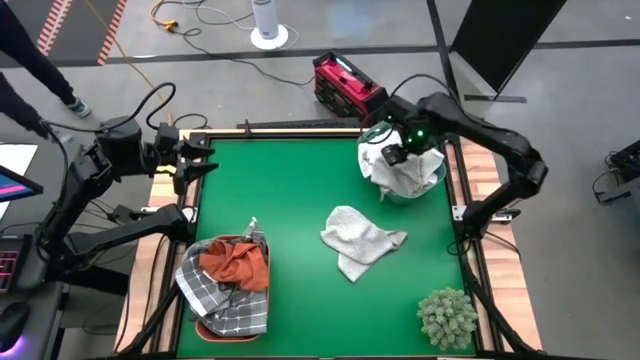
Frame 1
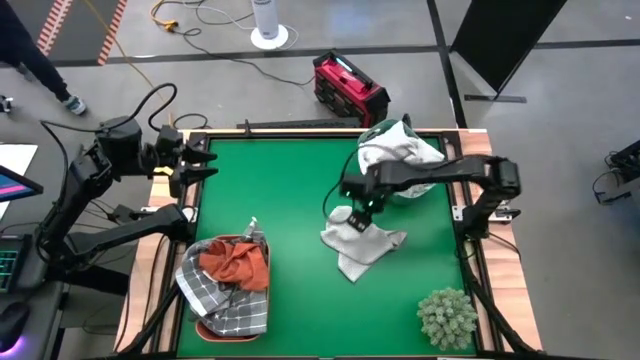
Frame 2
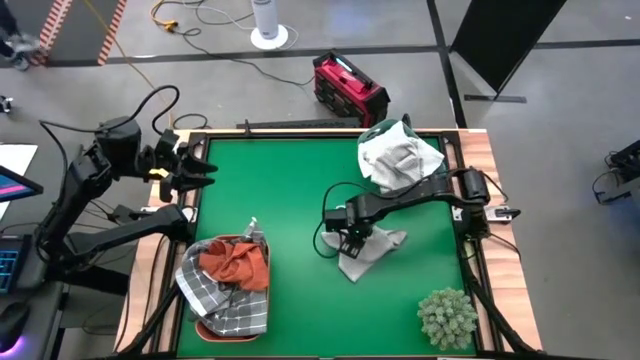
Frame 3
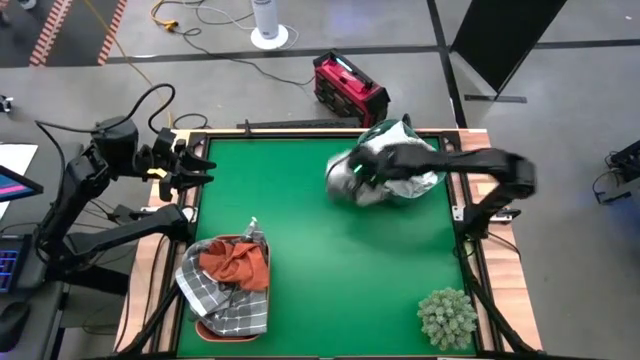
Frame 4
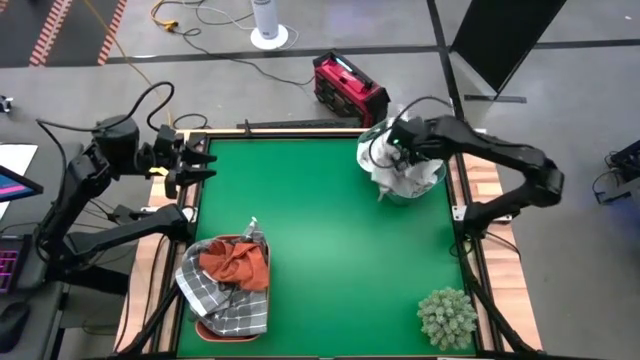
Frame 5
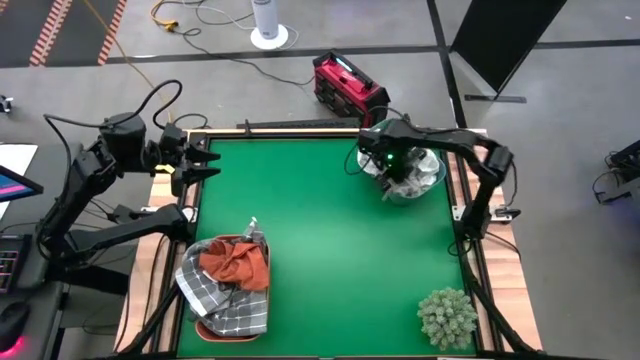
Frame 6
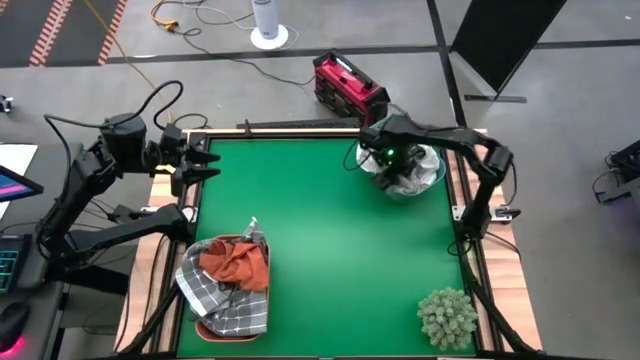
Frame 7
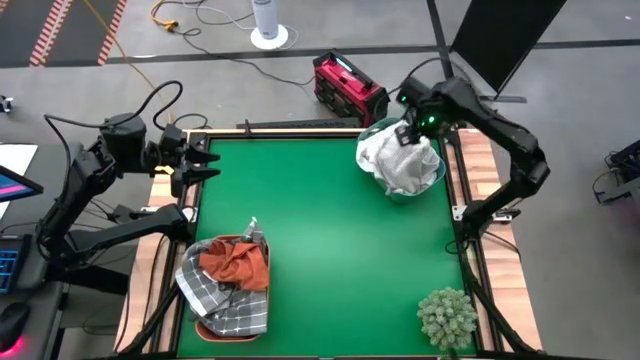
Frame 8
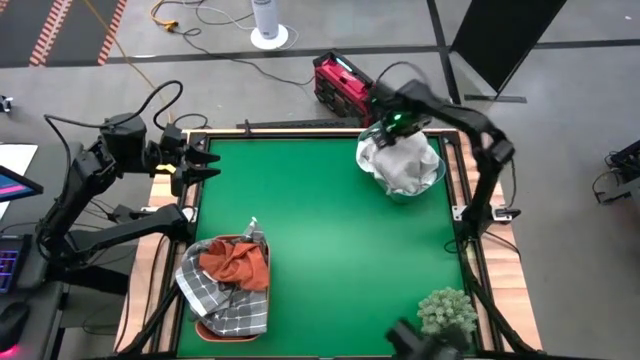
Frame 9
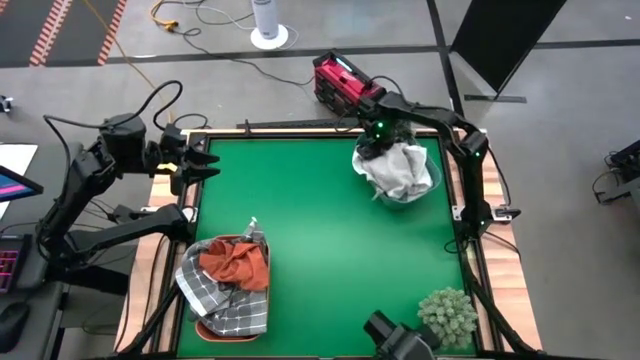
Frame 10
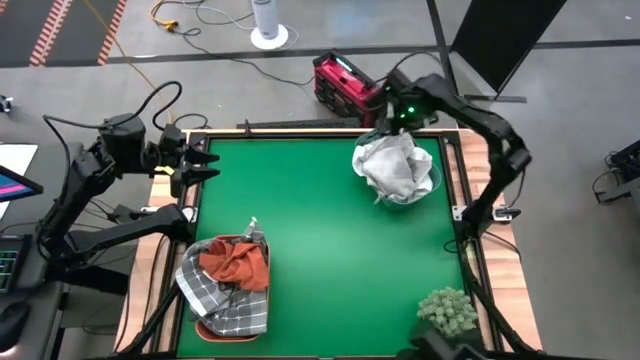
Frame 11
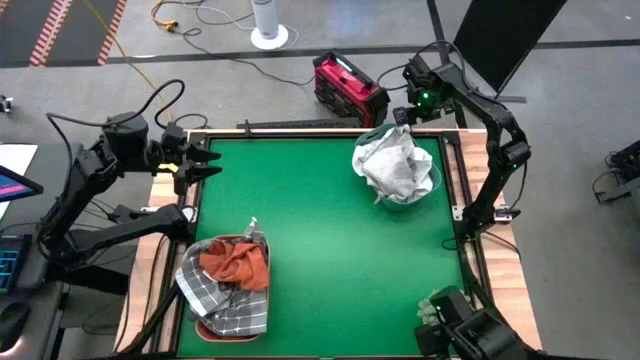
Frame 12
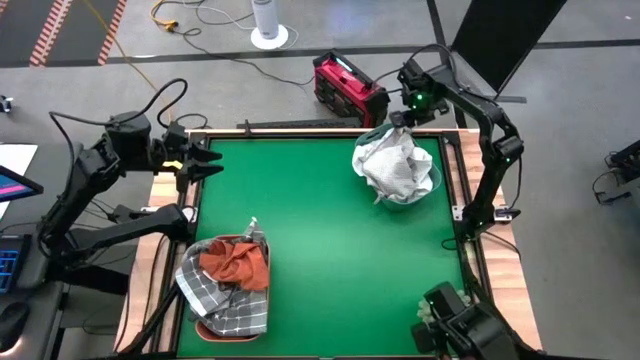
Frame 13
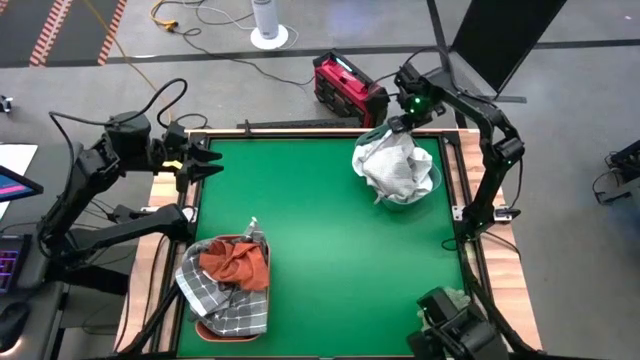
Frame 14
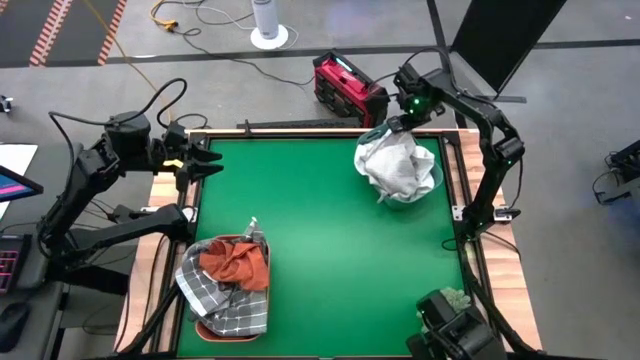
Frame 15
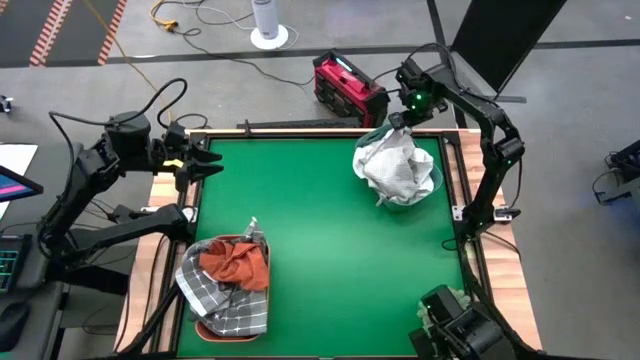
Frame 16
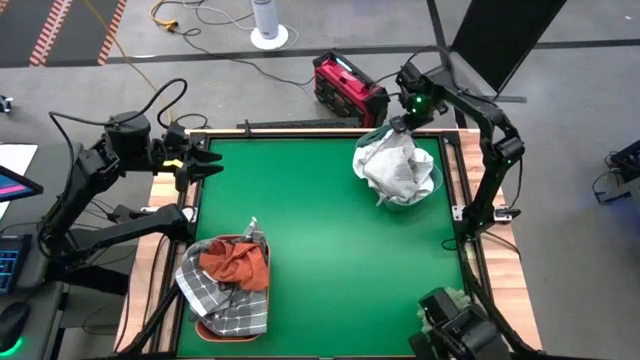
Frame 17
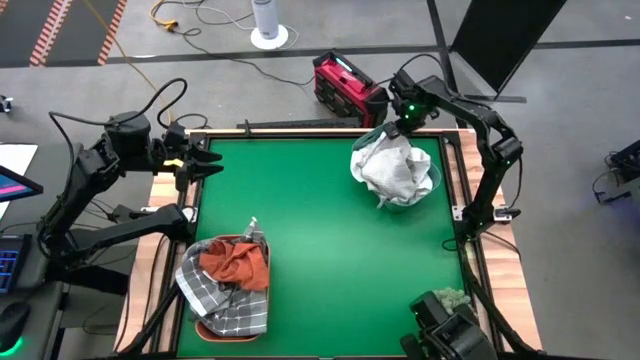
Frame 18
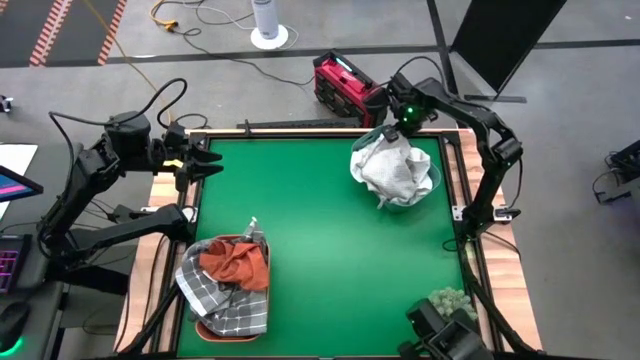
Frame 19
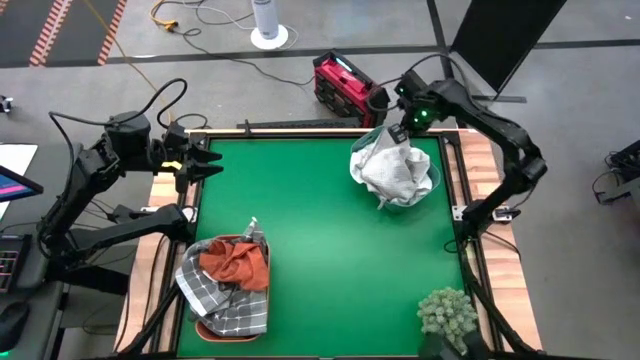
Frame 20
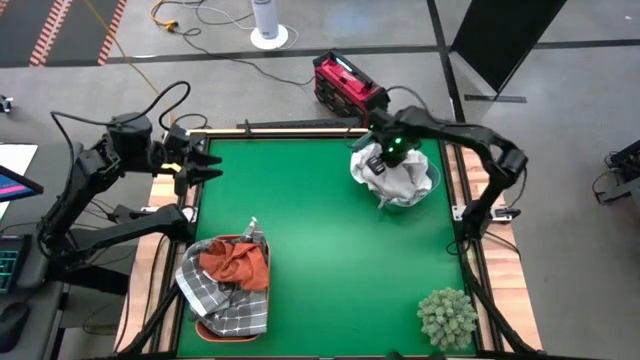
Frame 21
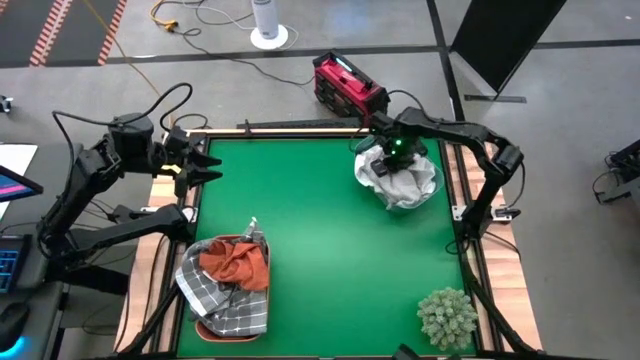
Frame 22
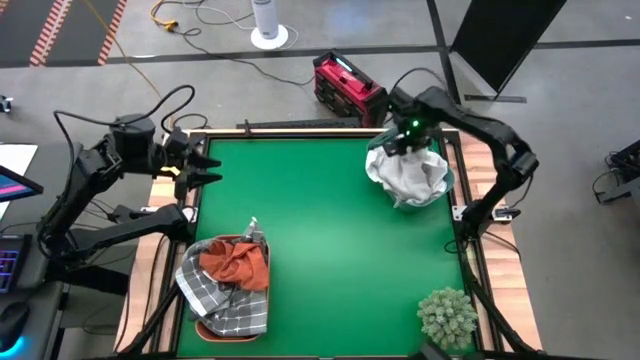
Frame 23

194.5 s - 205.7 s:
Task: Sort towels by color in basket
Put the light gray towel into the green bin

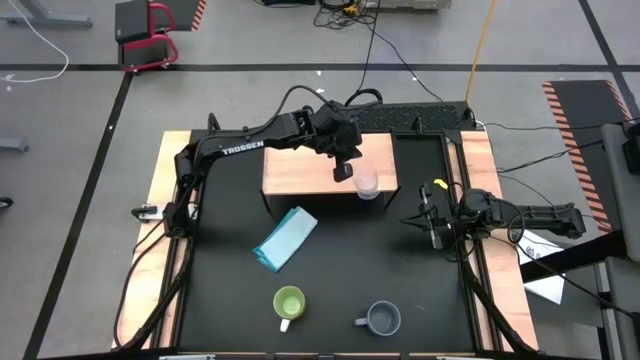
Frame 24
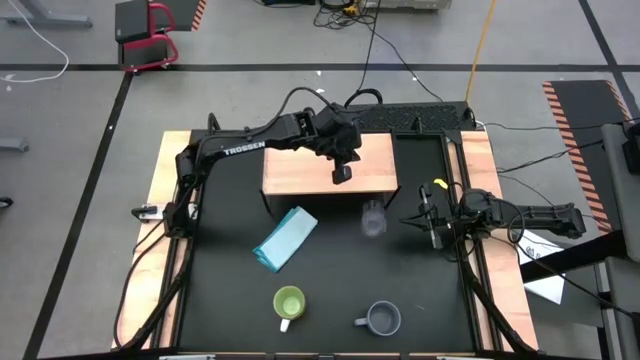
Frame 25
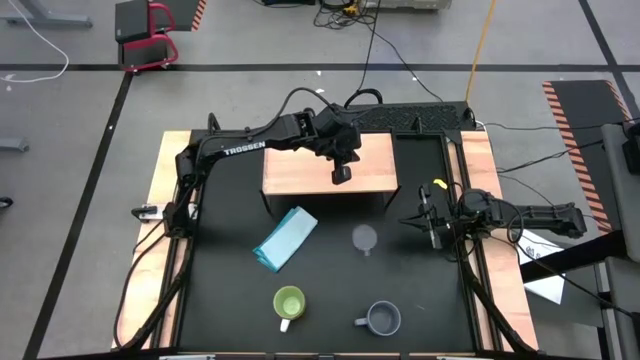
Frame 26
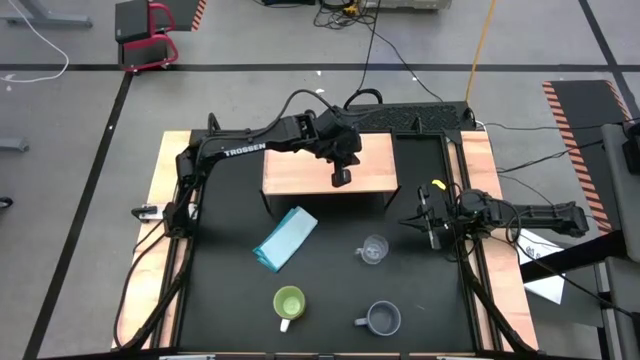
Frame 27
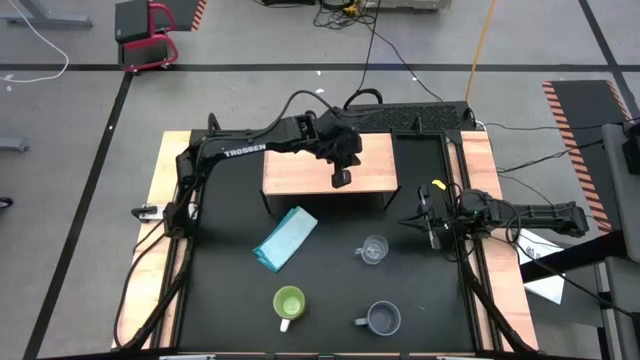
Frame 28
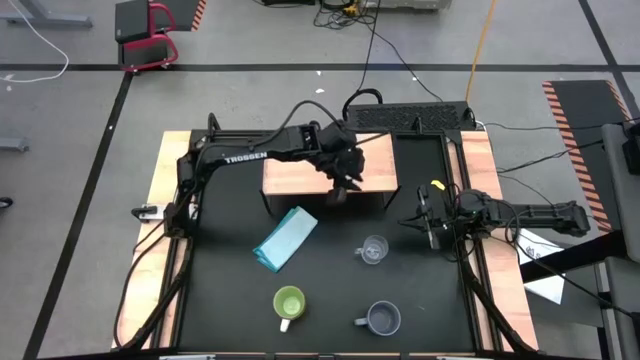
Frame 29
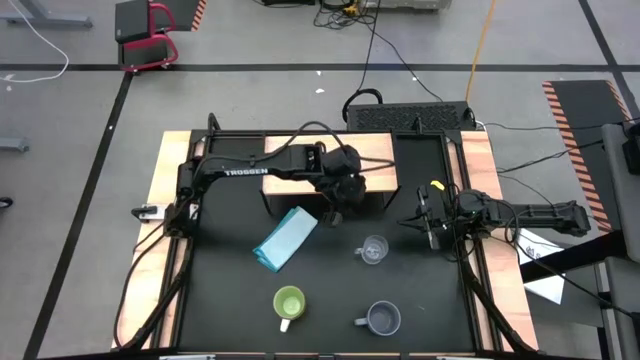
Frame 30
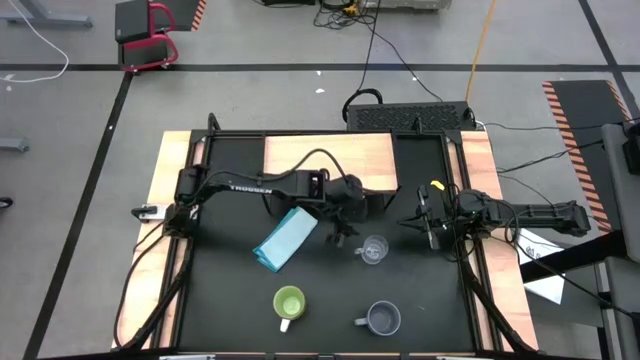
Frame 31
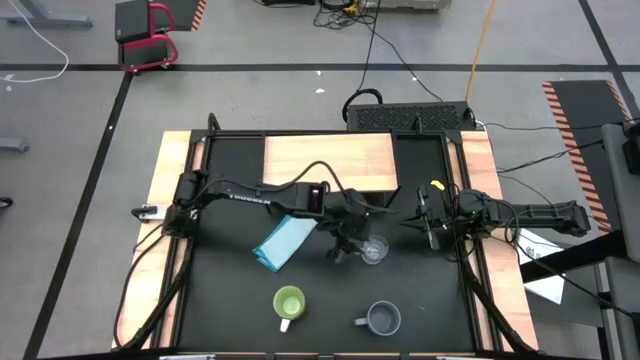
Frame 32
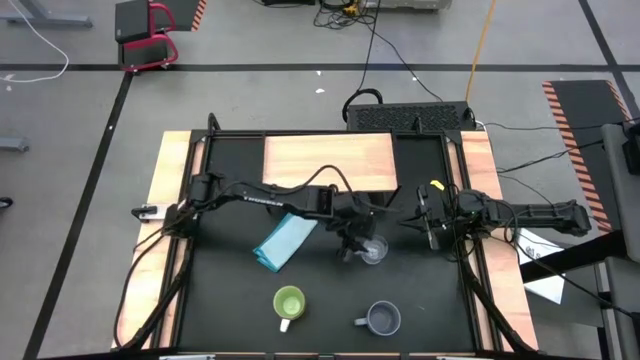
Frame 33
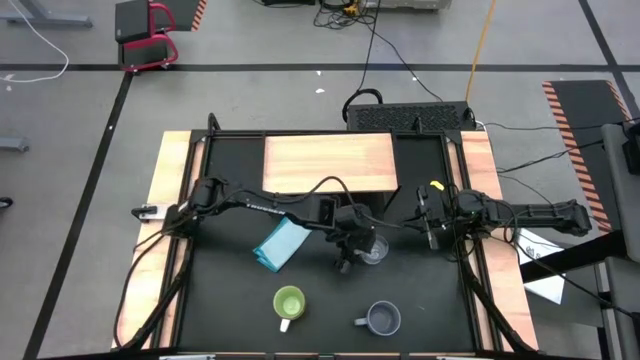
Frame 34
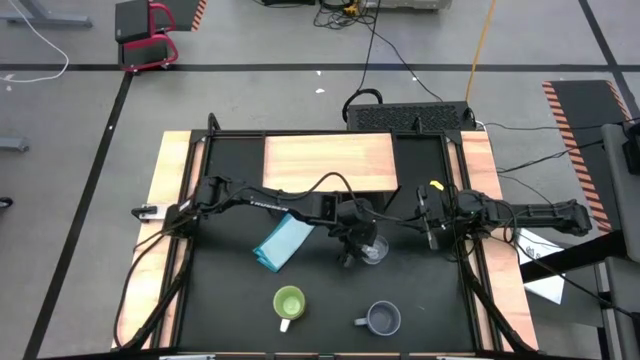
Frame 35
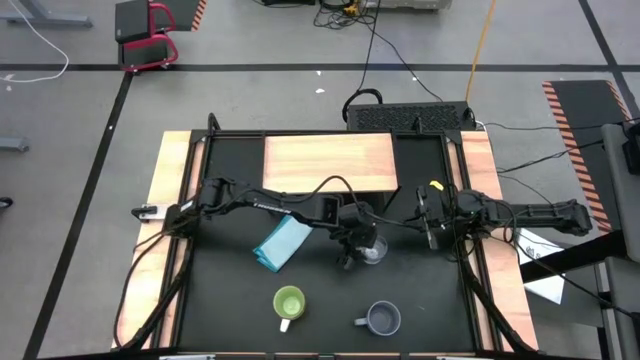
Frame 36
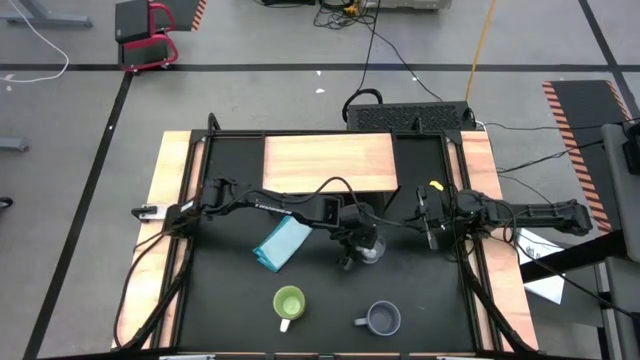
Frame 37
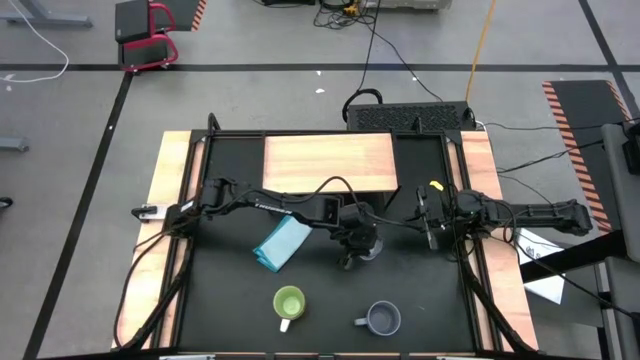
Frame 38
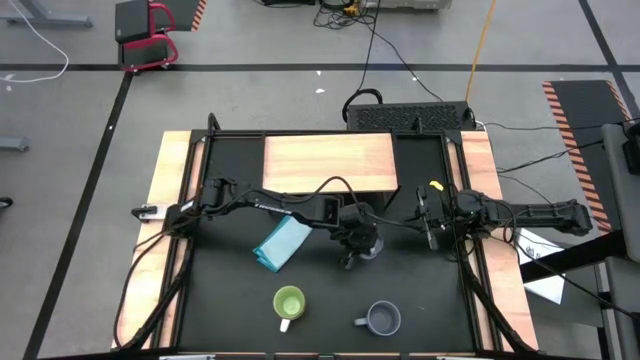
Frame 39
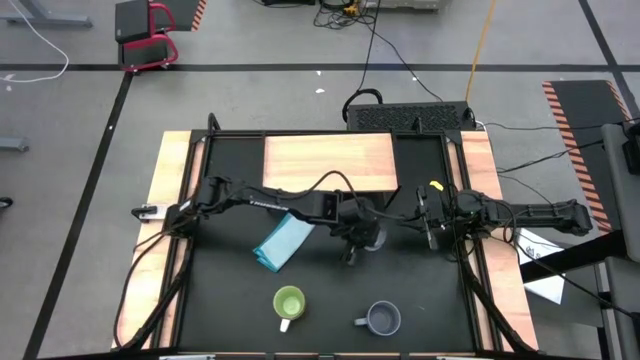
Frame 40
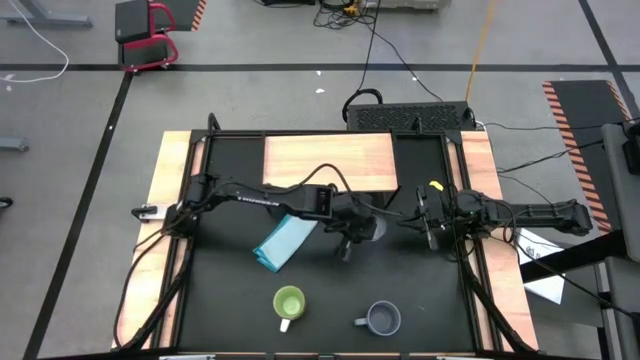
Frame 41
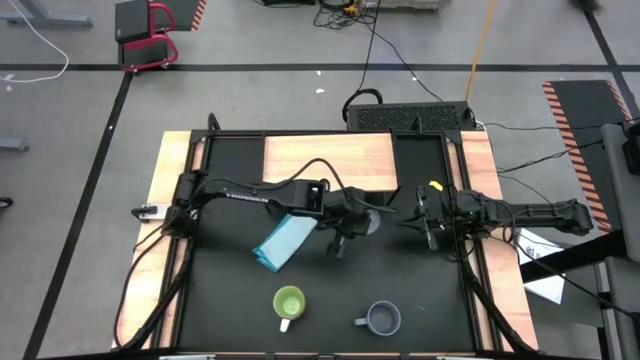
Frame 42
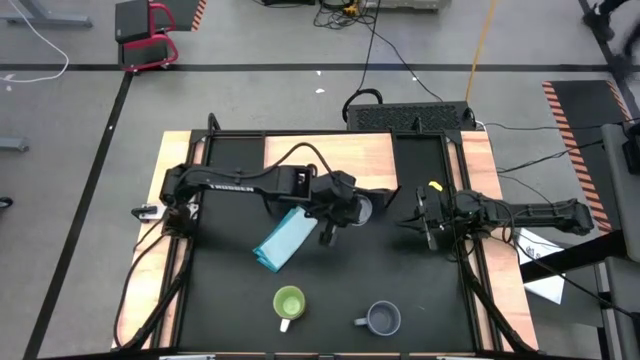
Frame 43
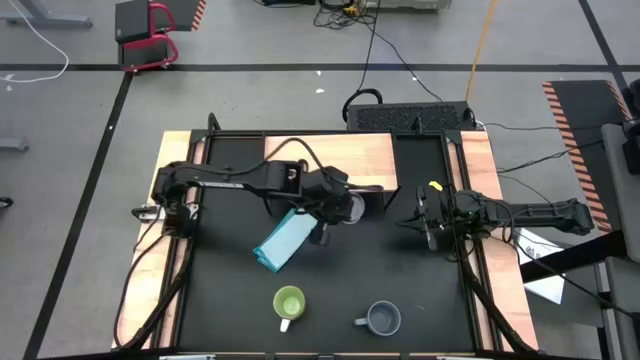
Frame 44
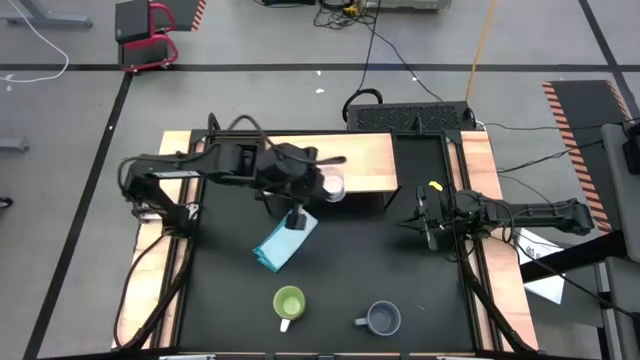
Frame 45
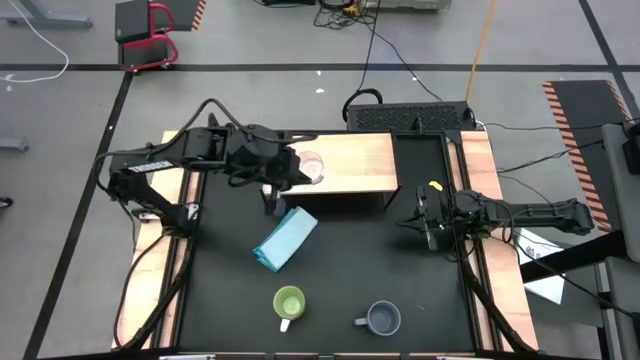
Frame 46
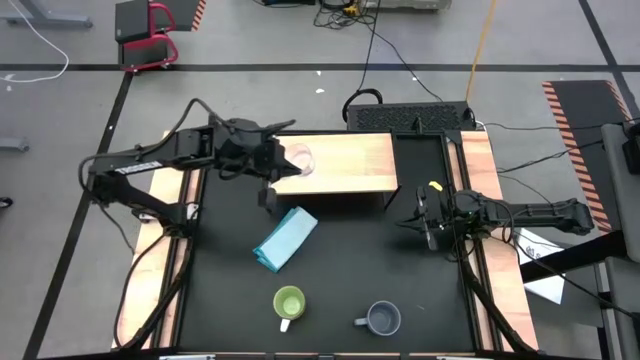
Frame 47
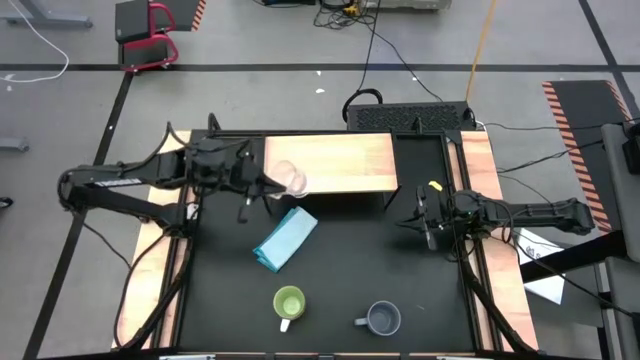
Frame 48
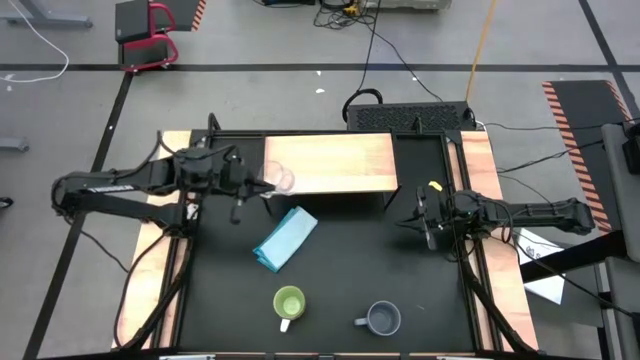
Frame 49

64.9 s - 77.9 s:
Task: Stack small to large cups/mugs on shelf
Put the transparent mug on the shelf
